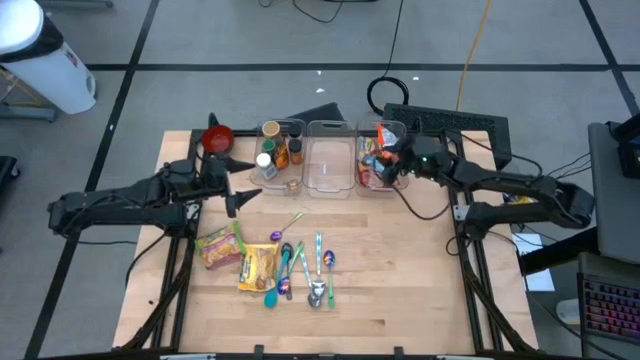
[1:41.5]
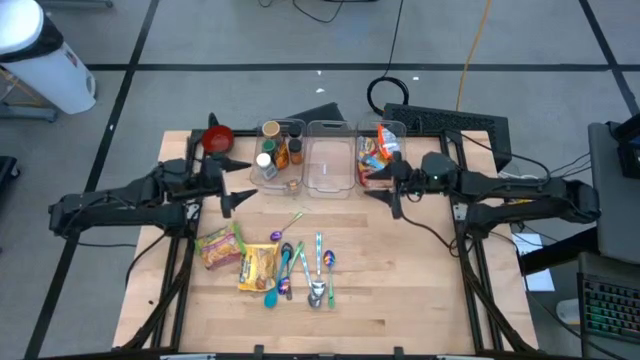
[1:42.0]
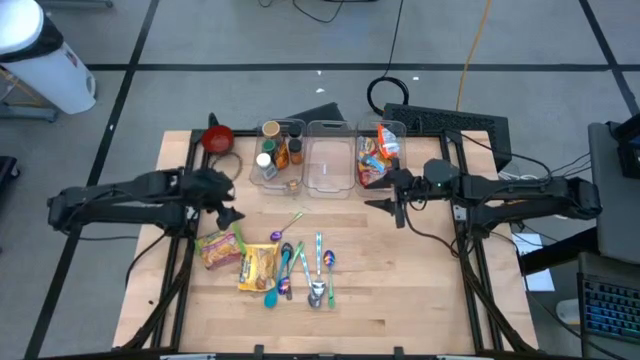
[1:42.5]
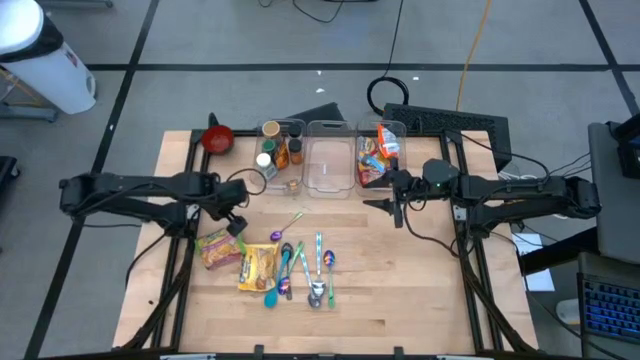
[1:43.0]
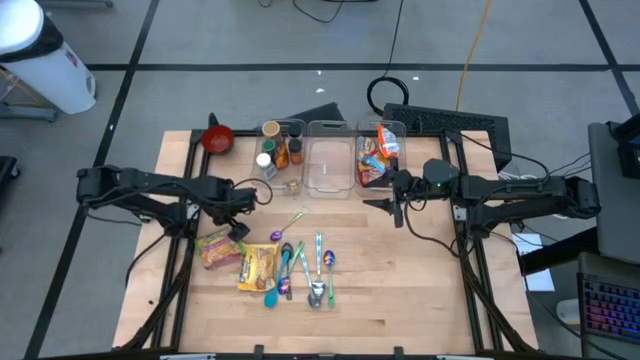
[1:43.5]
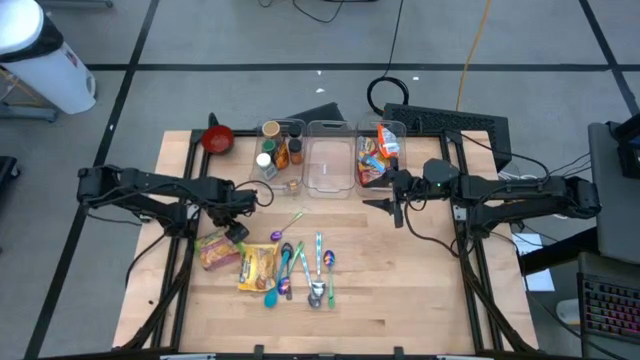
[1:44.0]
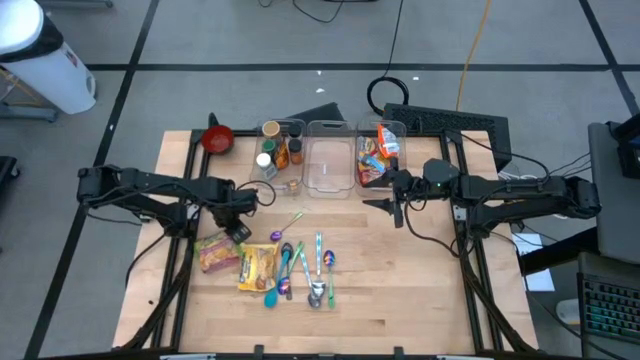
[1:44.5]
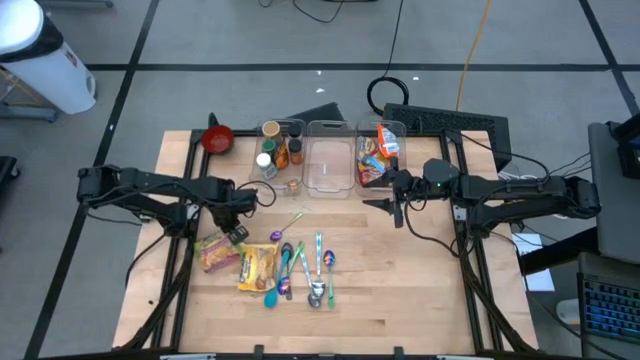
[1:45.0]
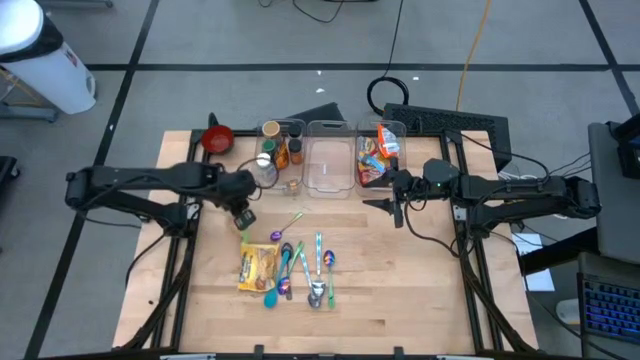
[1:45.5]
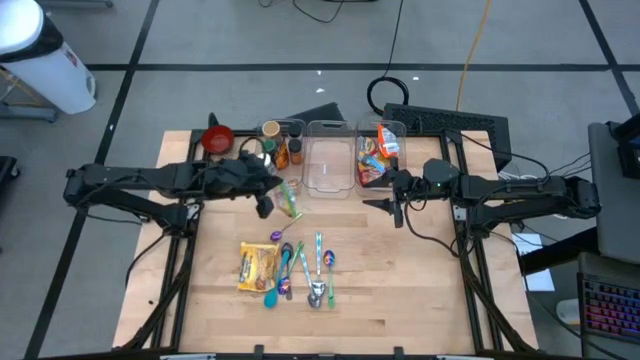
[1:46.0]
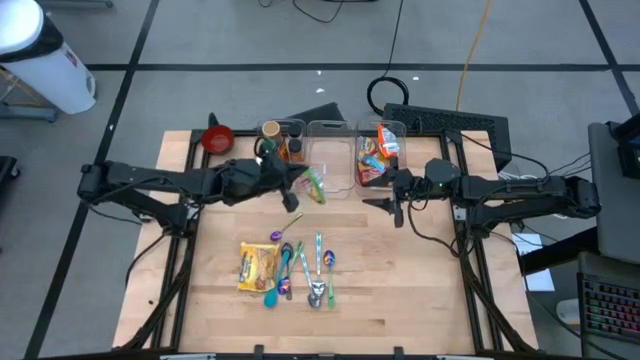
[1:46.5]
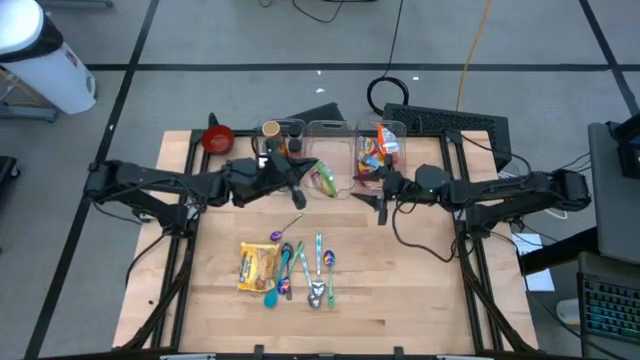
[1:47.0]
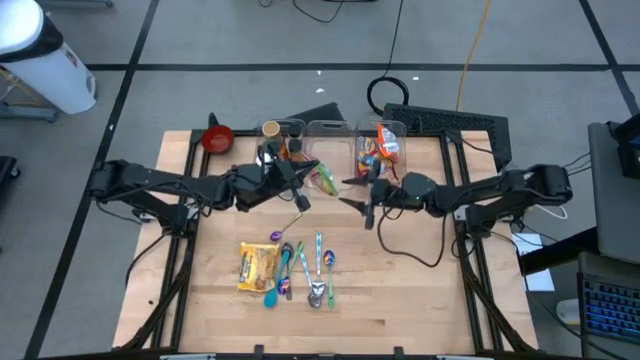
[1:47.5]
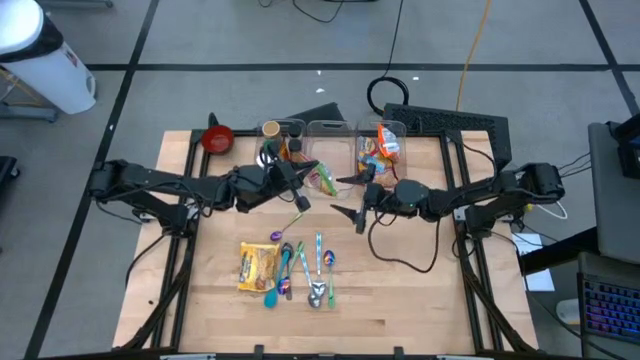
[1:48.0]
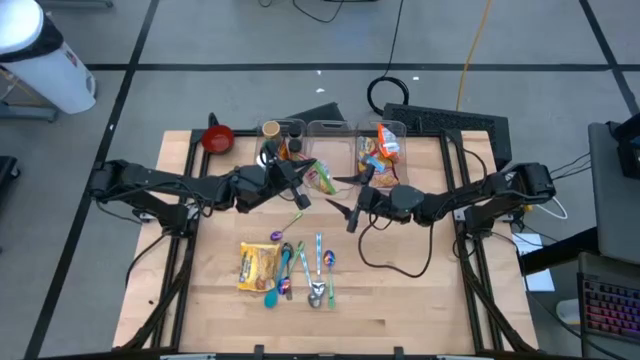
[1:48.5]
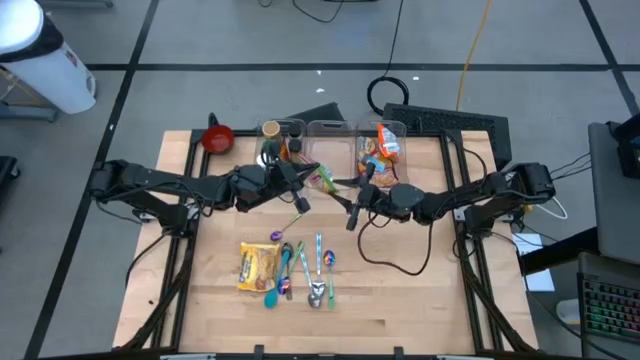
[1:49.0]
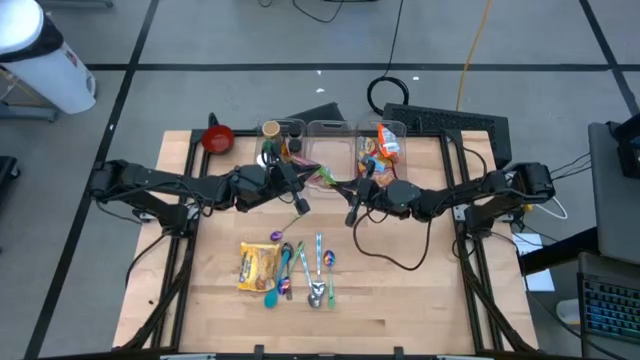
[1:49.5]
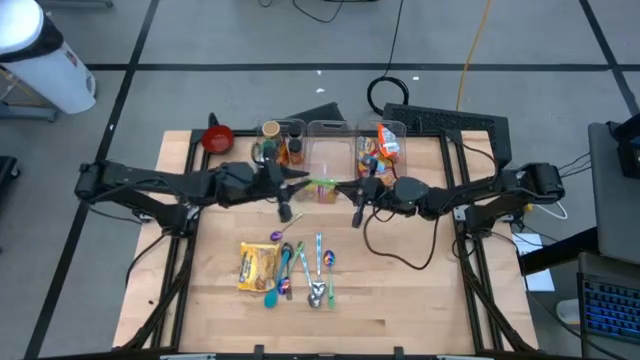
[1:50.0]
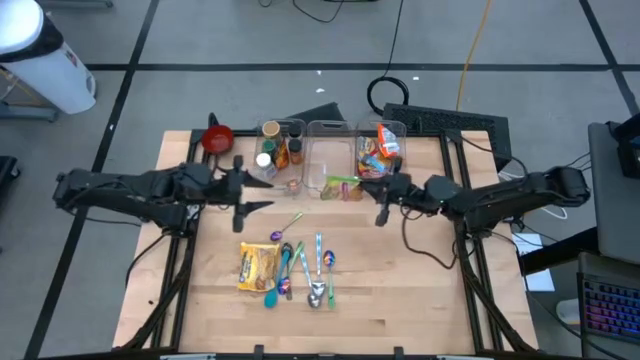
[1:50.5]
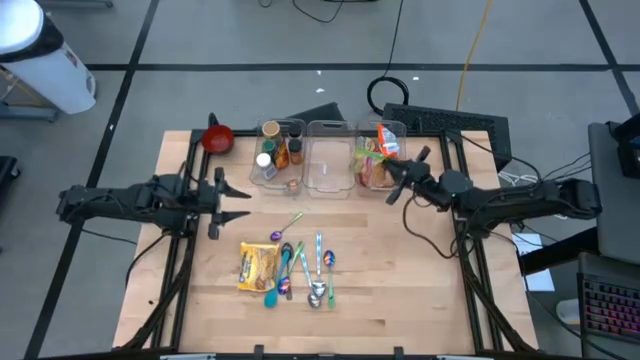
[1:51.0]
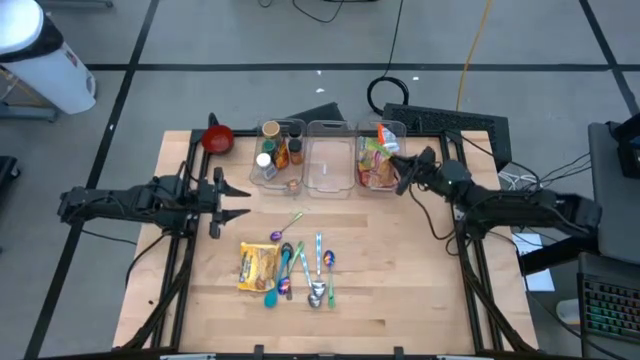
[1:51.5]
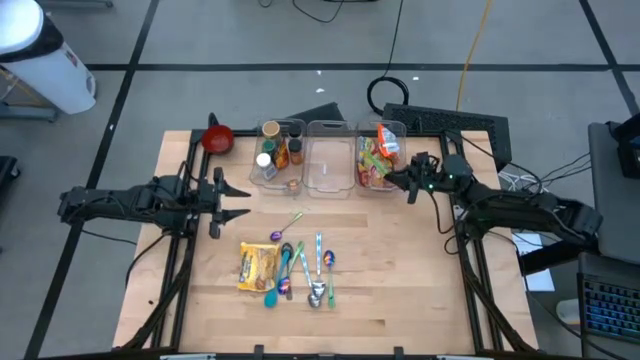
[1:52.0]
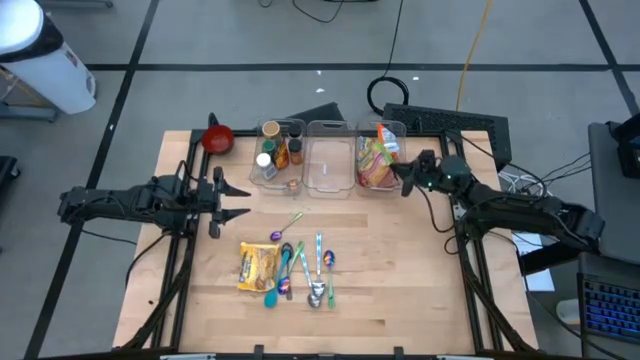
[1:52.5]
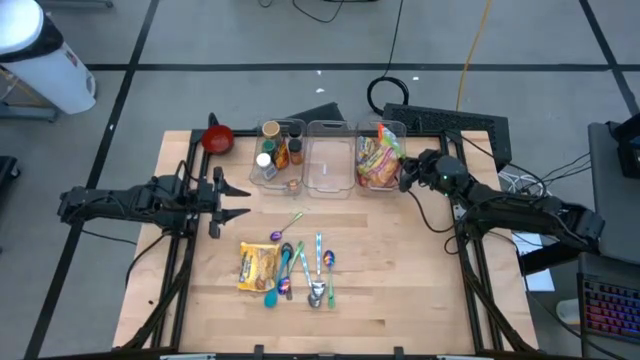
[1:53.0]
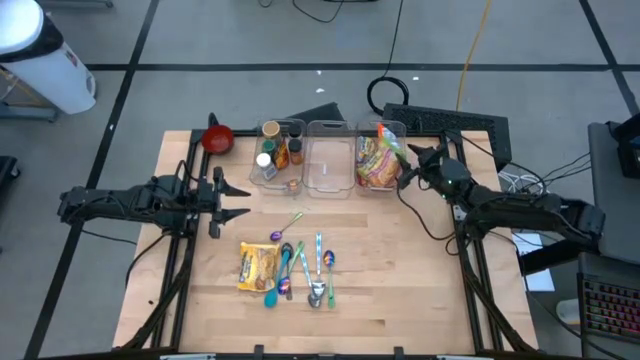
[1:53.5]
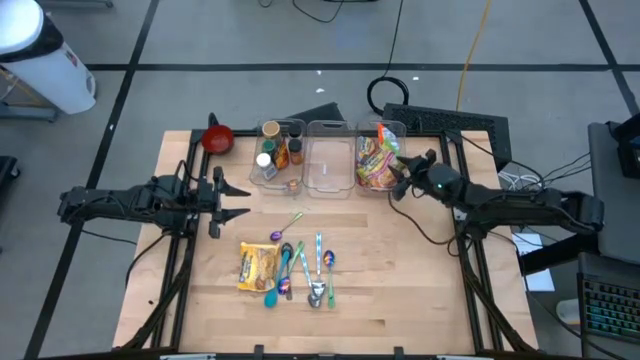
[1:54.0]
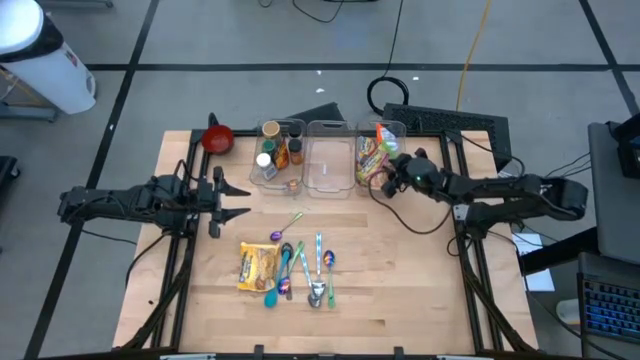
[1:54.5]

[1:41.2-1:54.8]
Task: Pick & Place Food Item
Put the green noodle pack into the right transparent bin

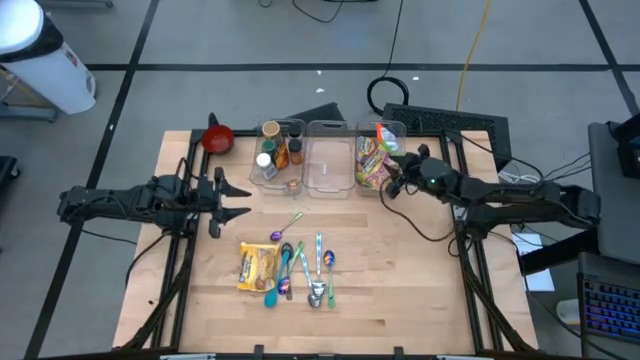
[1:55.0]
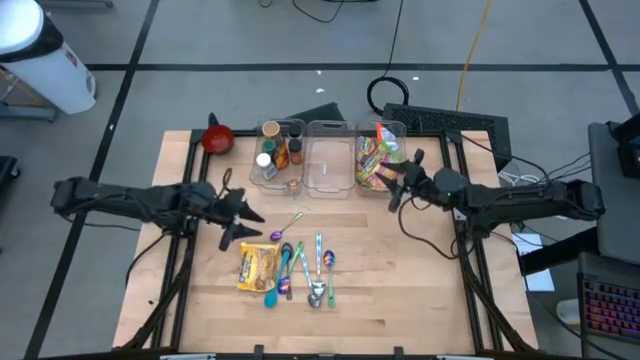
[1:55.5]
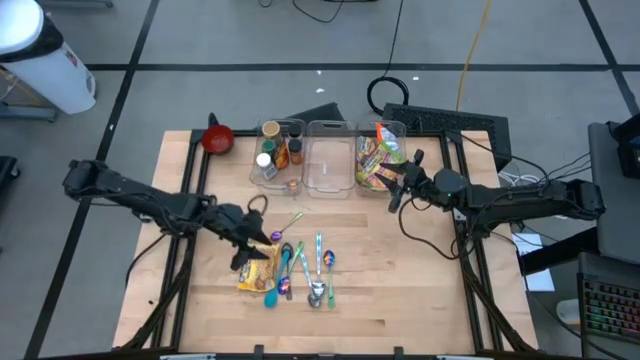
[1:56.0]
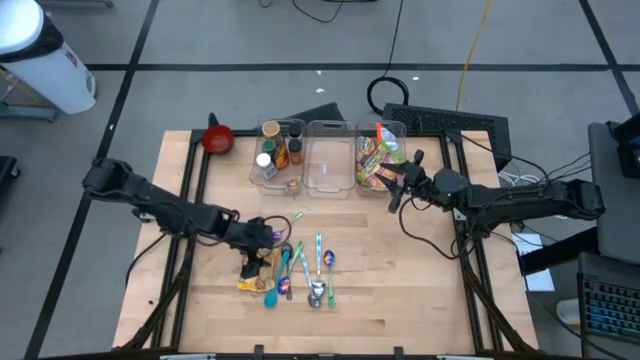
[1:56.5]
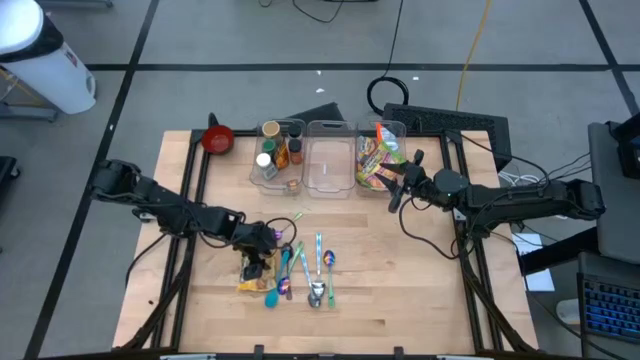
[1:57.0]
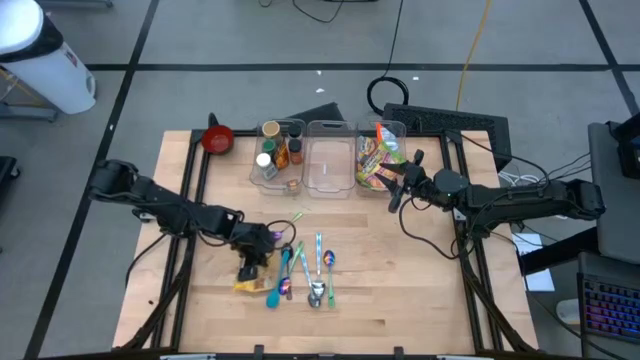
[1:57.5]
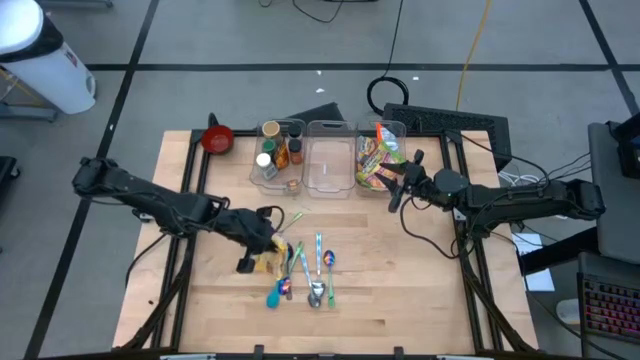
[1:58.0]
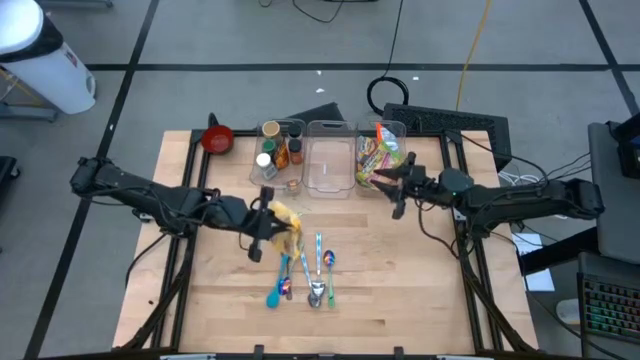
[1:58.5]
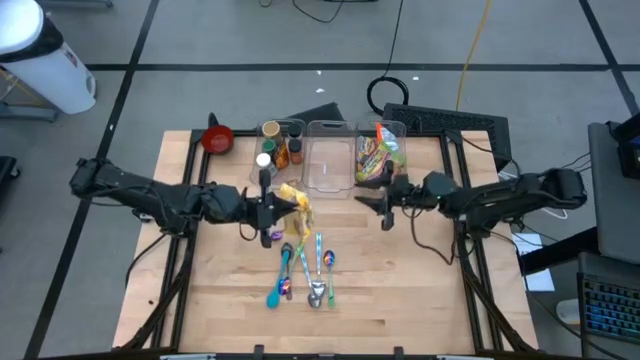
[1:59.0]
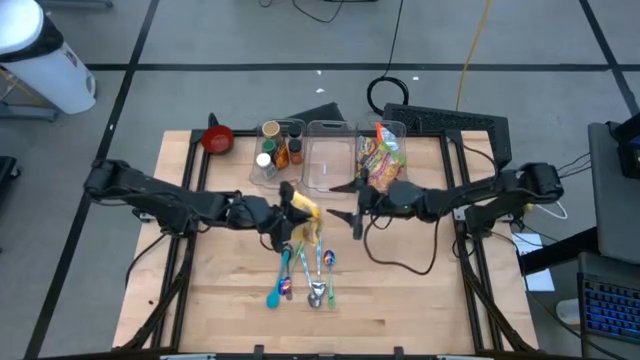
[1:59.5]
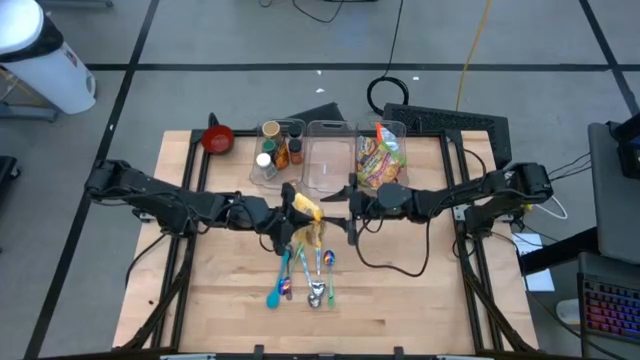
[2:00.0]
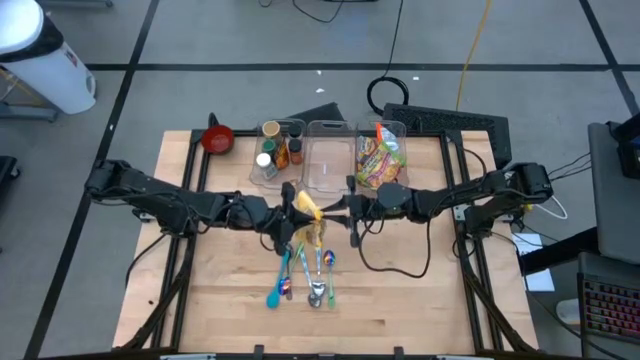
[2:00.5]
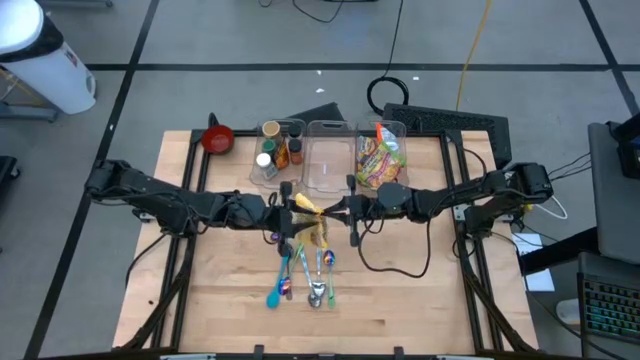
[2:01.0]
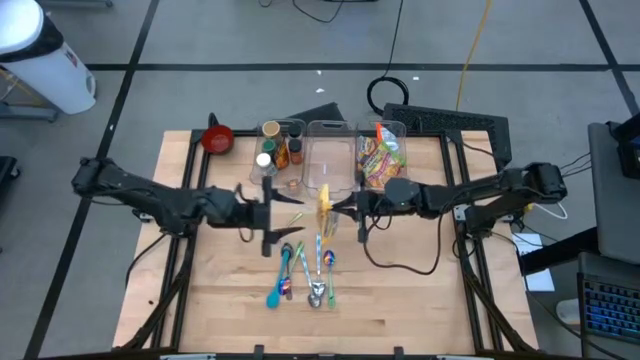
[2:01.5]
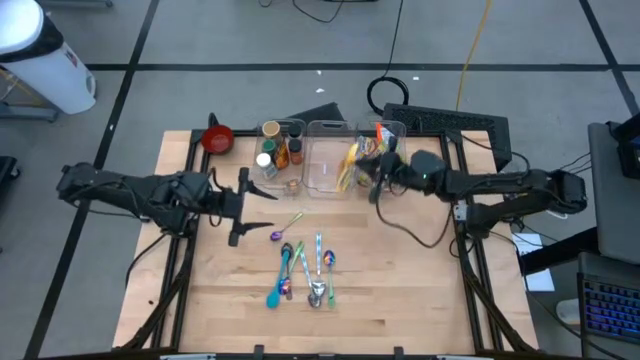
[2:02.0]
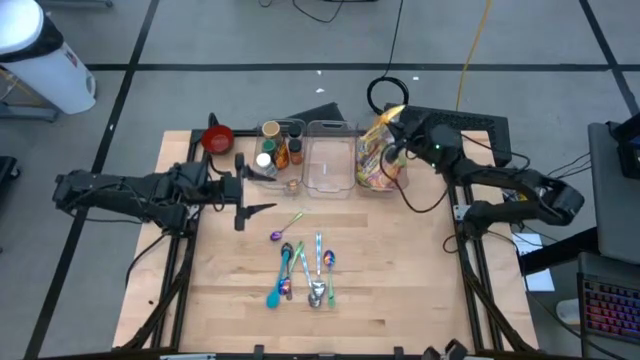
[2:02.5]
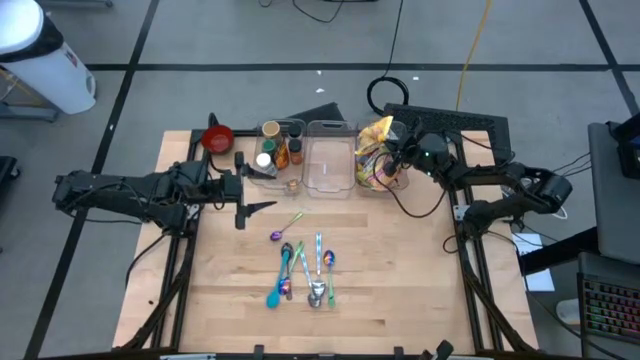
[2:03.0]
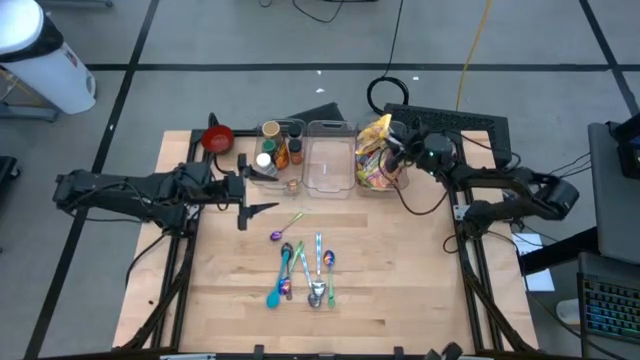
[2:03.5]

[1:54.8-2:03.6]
Put the yellow noodle pack into the right transparent bin
